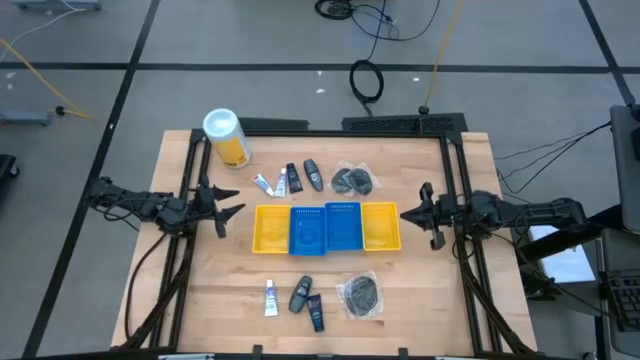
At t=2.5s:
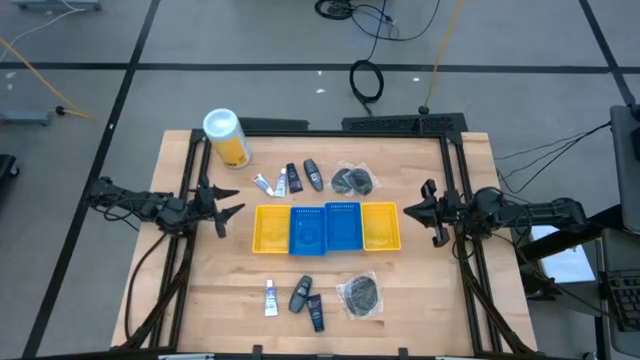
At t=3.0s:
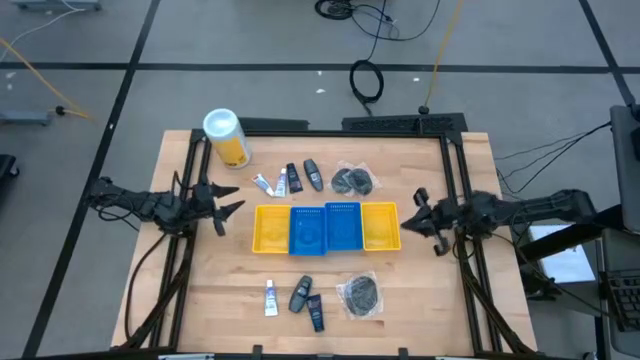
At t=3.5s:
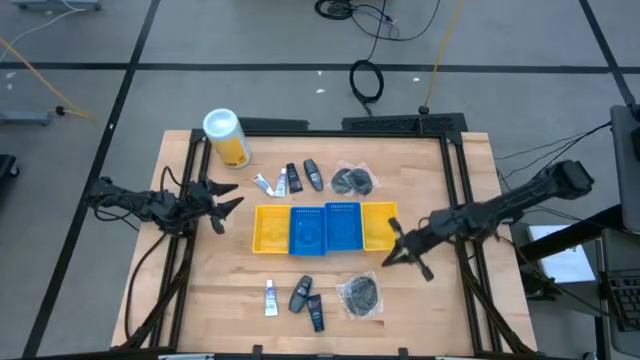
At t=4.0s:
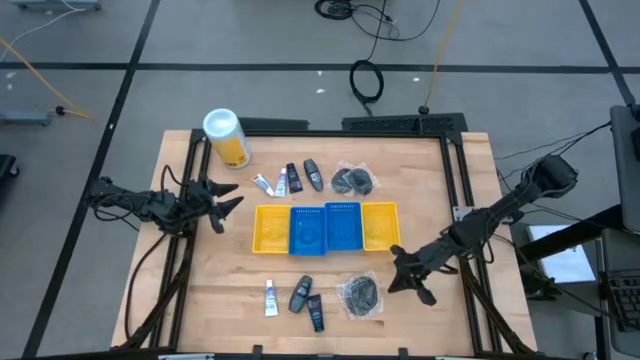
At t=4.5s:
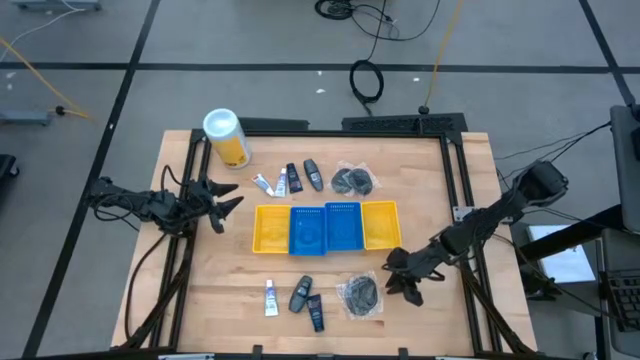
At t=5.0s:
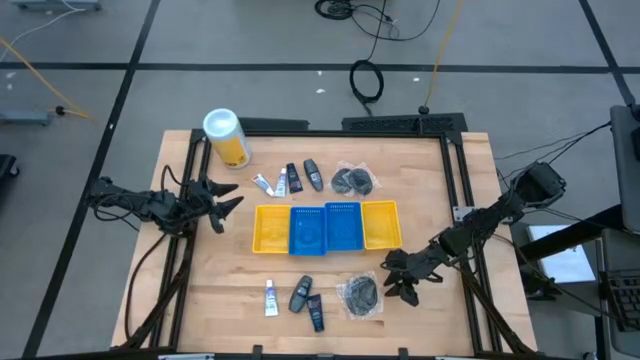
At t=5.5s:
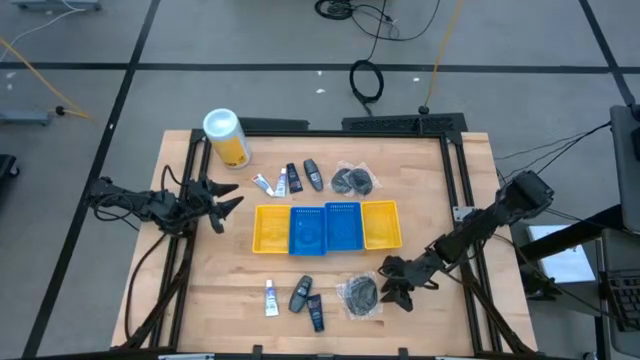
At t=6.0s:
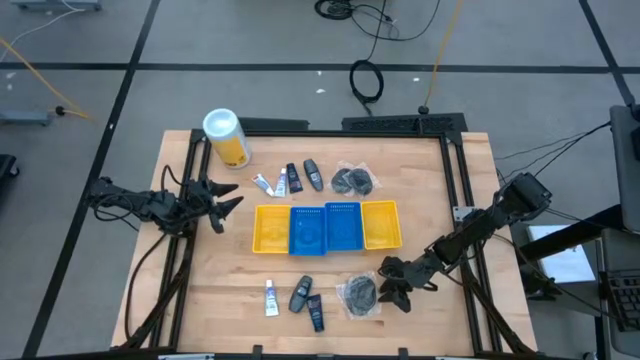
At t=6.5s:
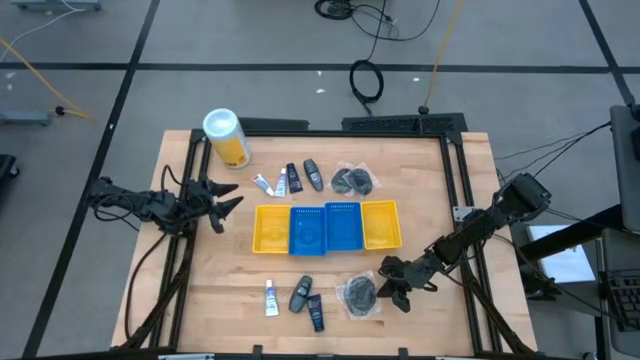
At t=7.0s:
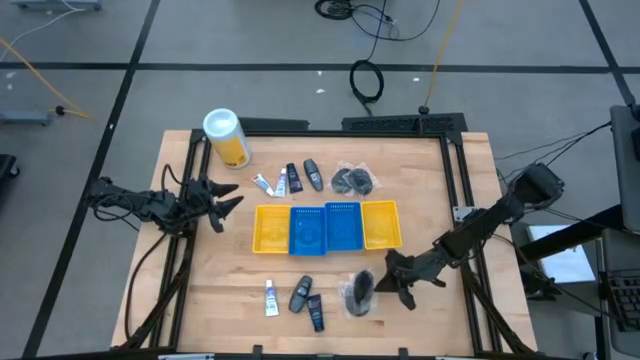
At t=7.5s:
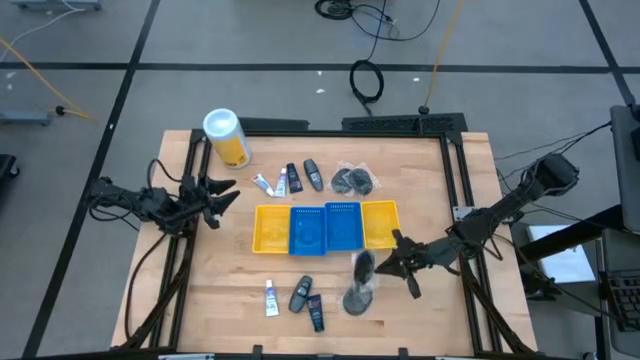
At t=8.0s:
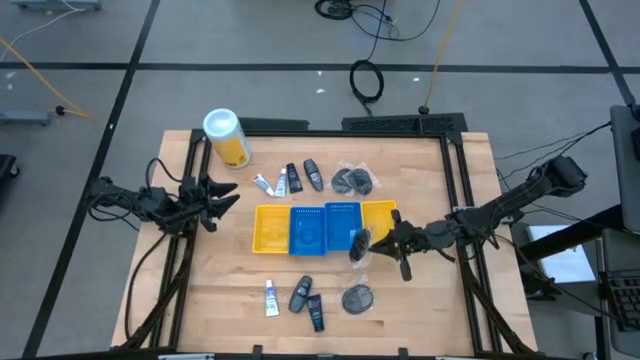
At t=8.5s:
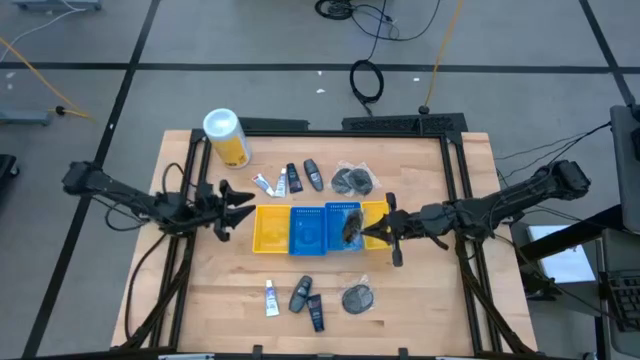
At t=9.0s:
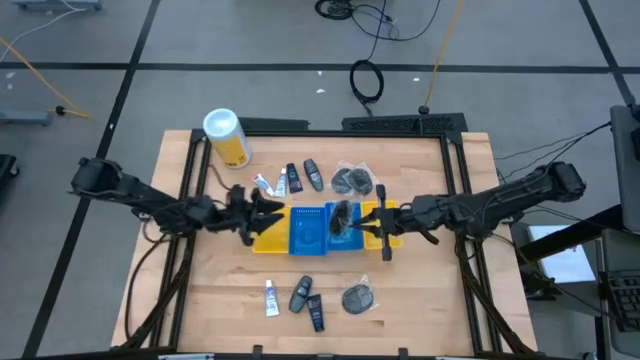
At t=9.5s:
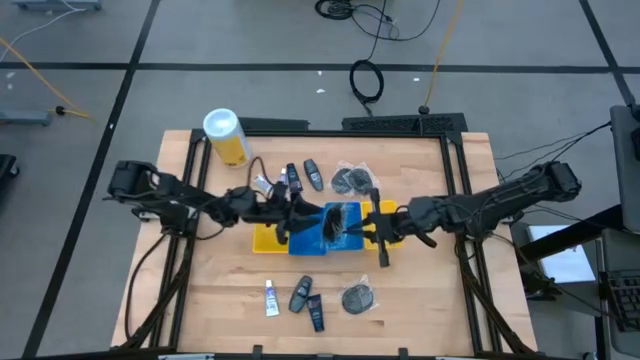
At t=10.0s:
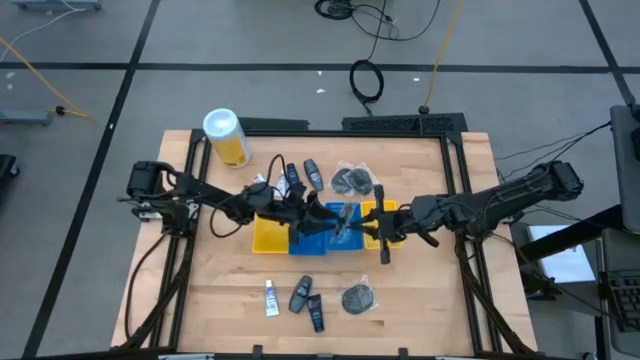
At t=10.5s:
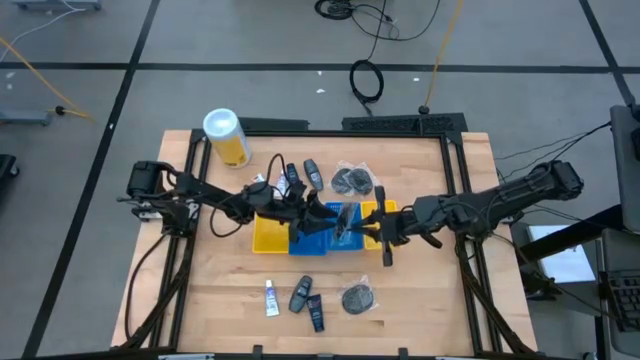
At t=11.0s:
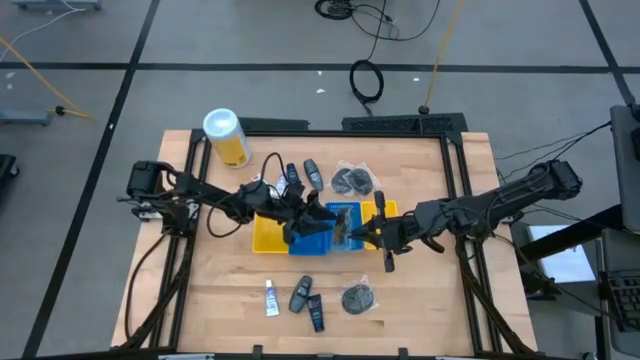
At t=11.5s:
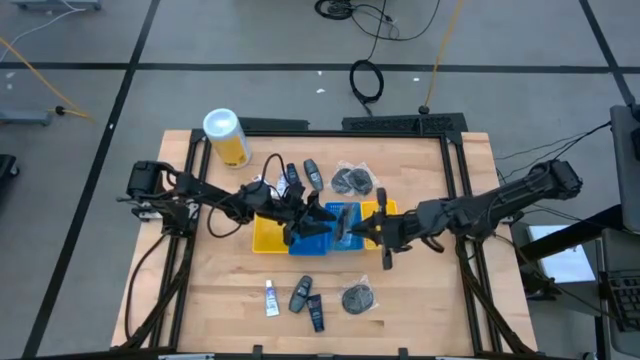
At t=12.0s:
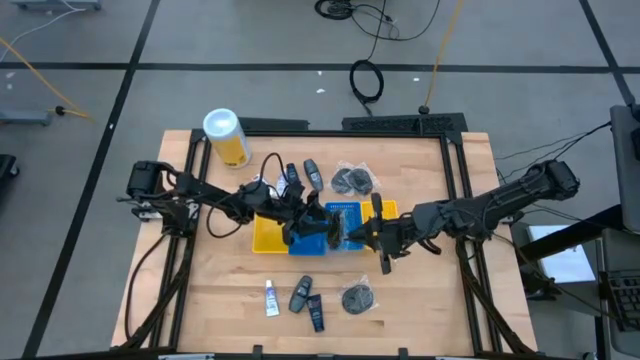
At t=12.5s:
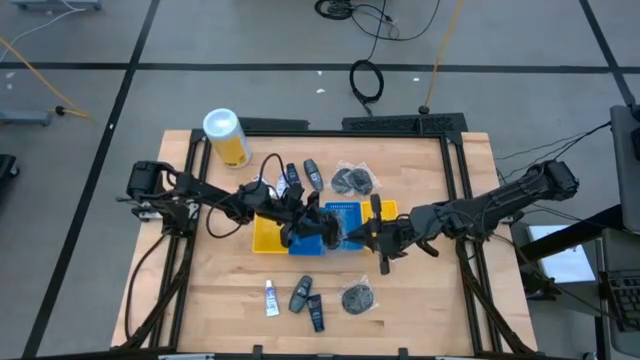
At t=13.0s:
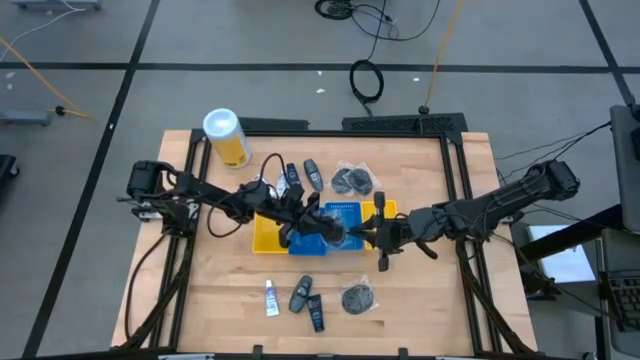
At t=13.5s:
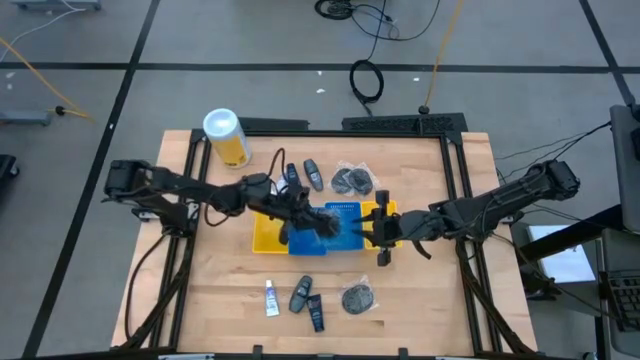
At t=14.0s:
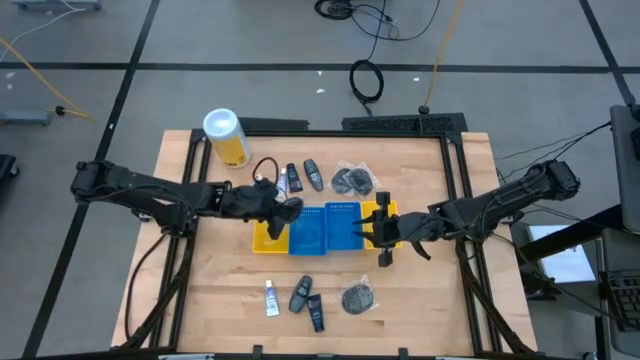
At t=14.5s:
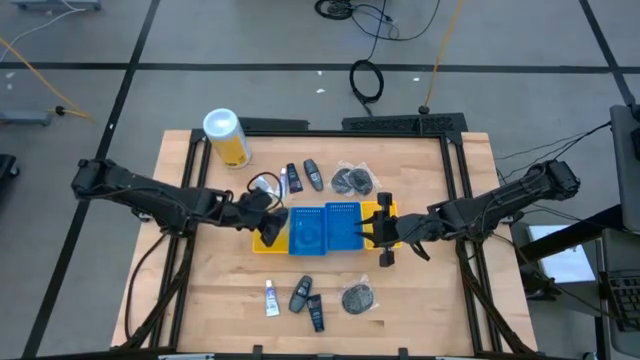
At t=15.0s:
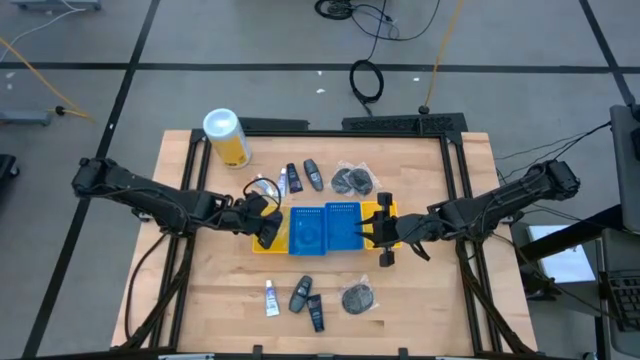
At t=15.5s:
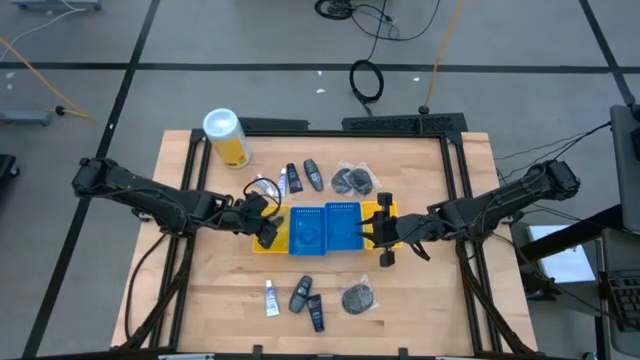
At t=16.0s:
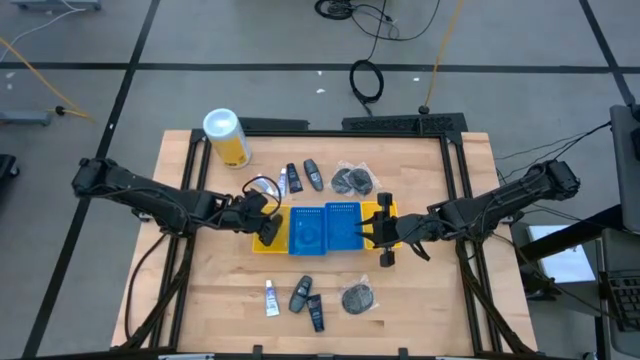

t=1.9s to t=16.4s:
Task: Pick & Place Travel size toiletries
Put the hairbrush into the left yellow bin

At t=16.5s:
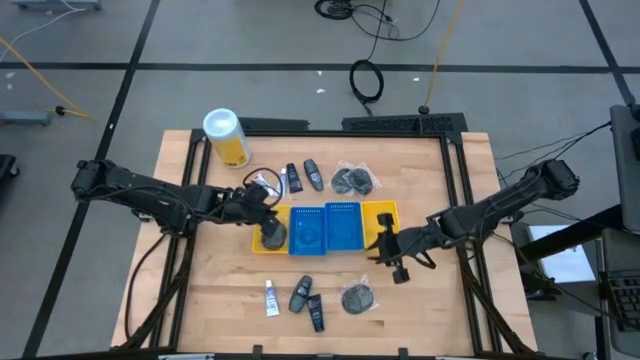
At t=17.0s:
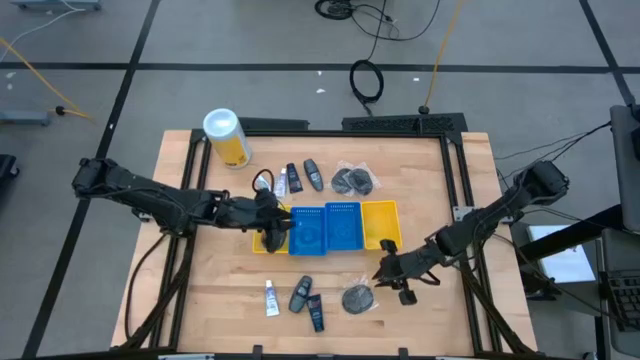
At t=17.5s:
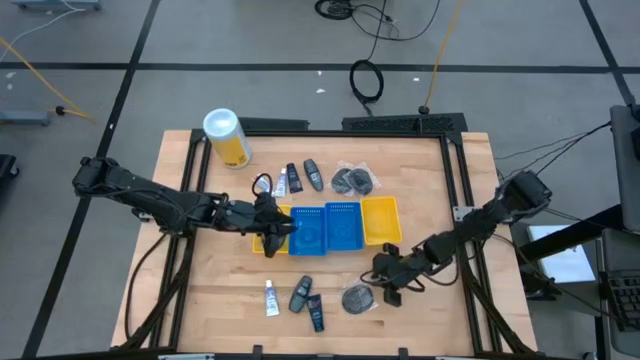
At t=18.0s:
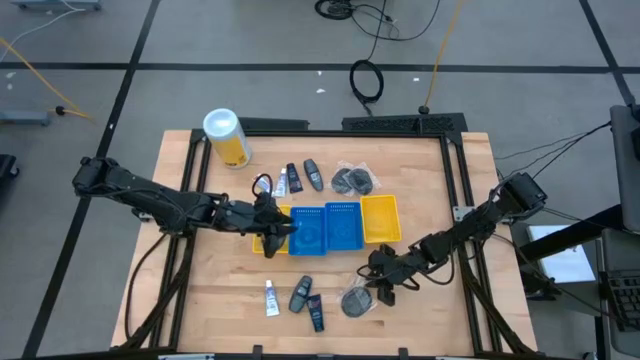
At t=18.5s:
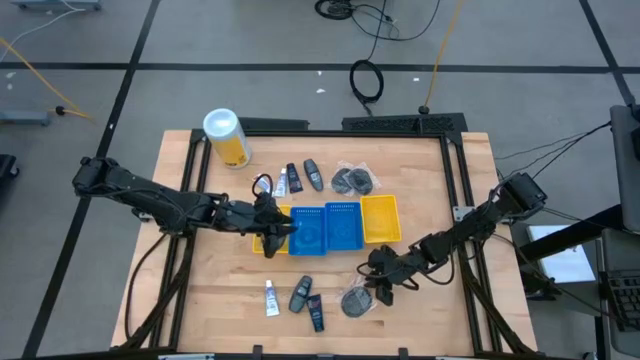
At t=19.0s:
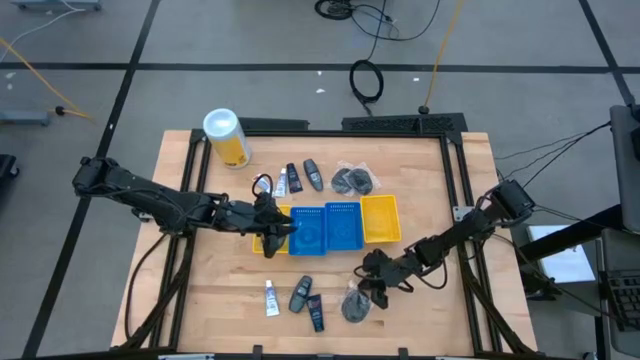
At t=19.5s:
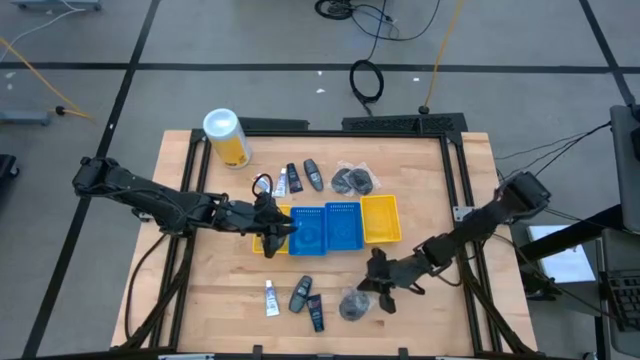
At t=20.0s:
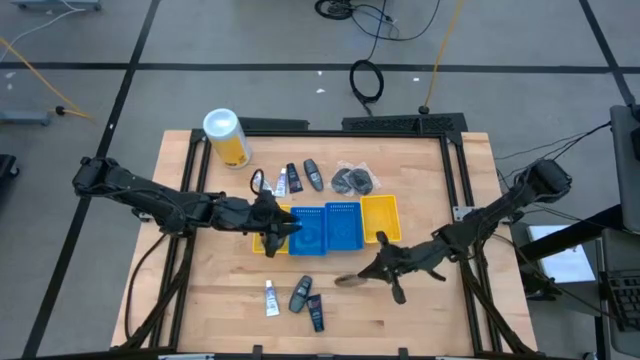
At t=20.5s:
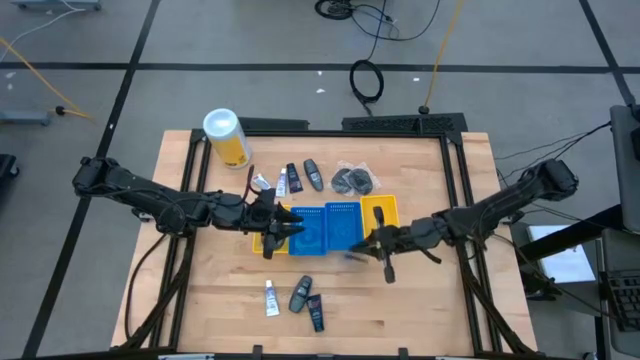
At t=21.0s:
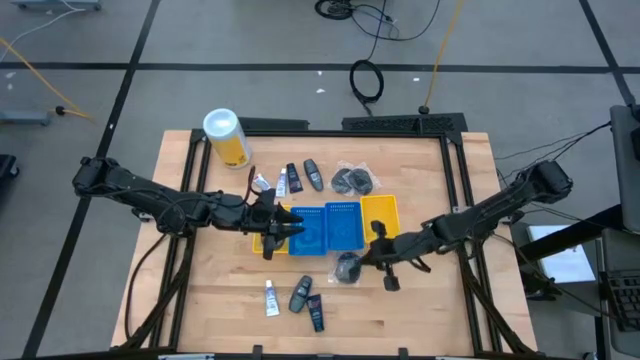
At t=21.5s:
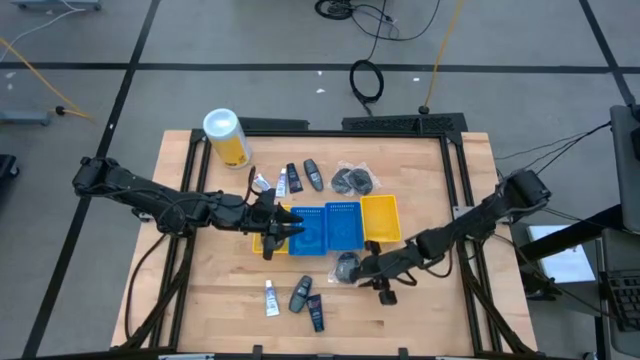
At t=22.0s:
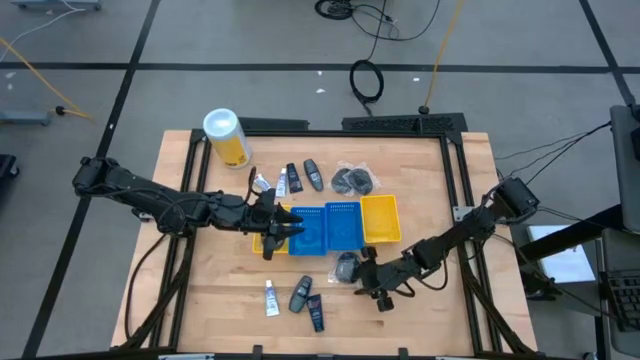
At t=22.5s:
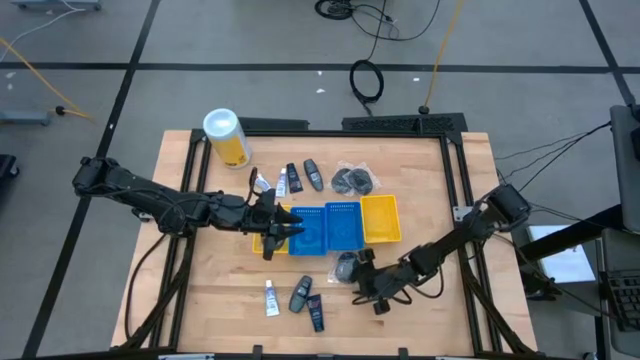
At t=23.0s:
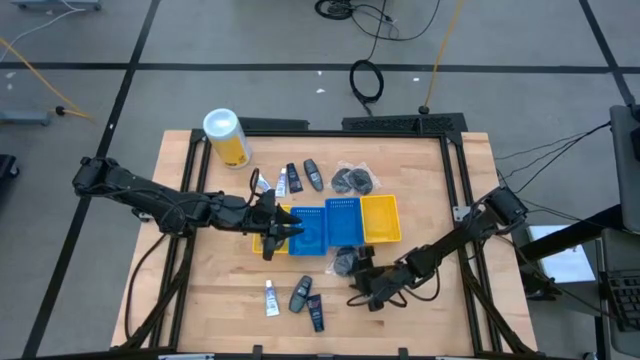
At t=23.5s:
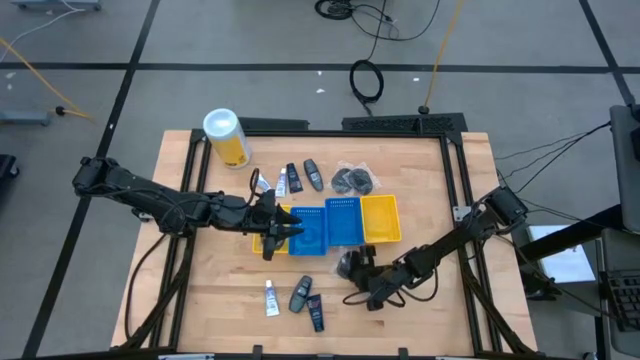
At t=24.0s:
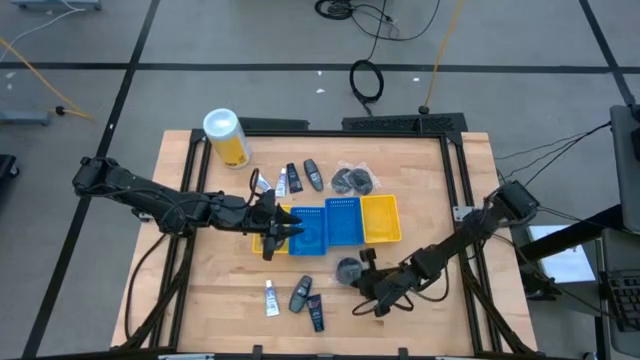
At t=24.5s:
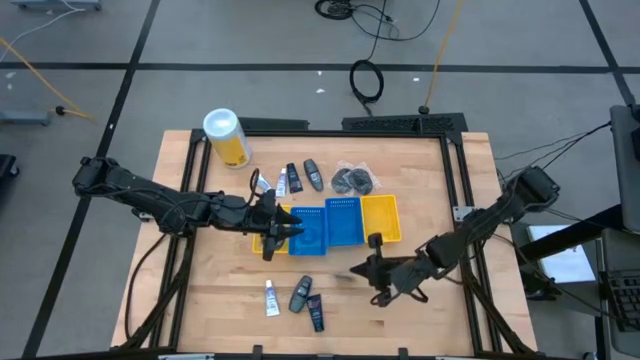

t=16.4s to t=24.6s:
Put the hairbrush into the left yellow bin
